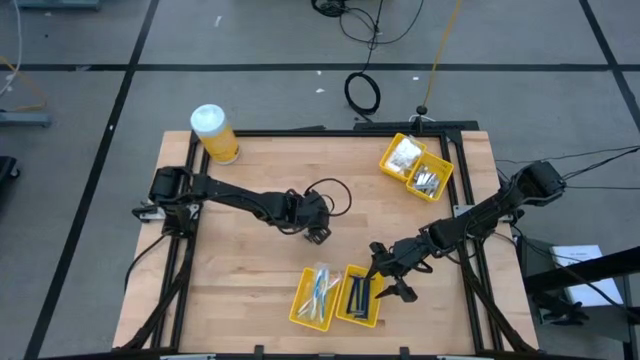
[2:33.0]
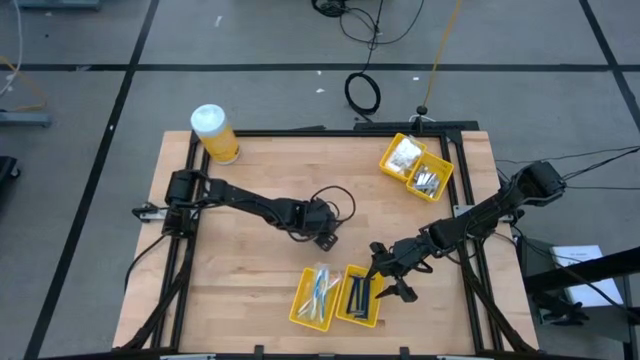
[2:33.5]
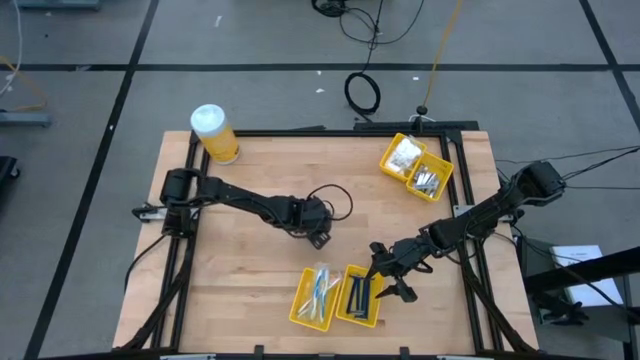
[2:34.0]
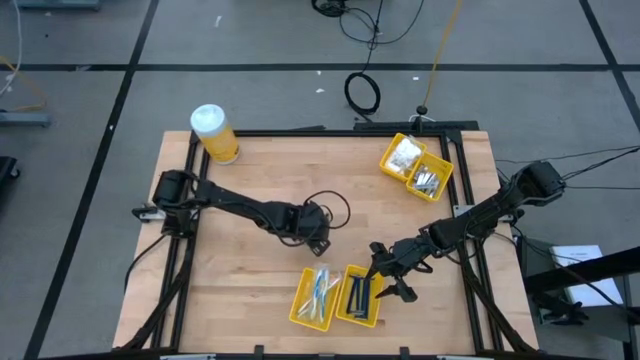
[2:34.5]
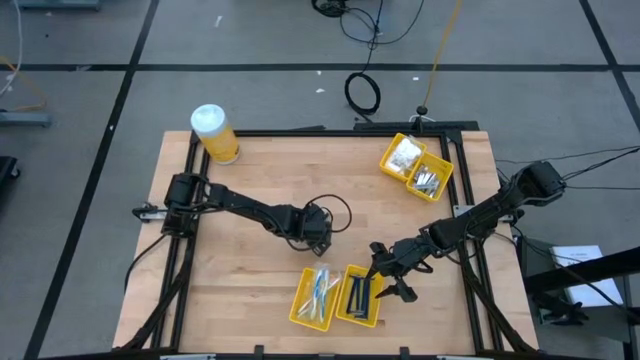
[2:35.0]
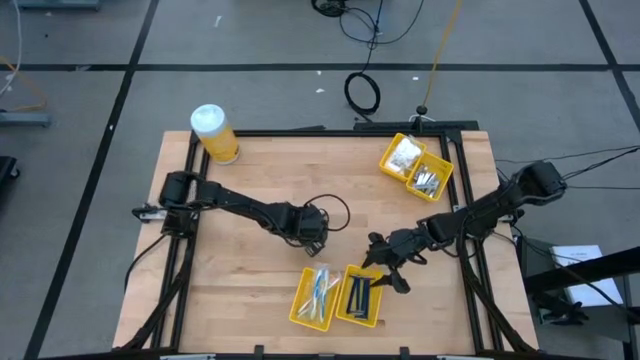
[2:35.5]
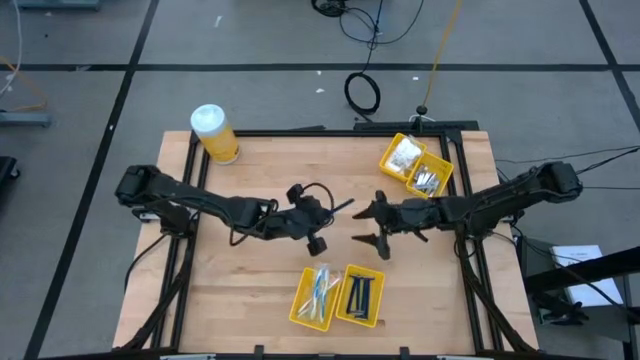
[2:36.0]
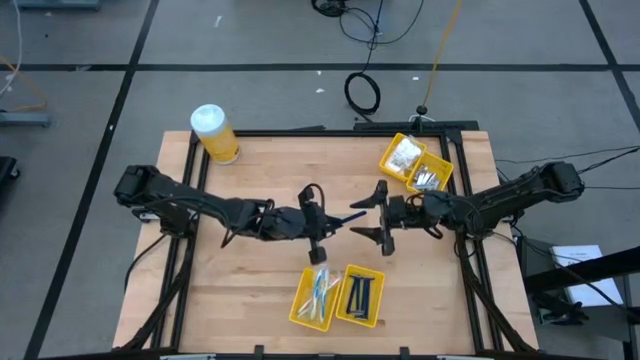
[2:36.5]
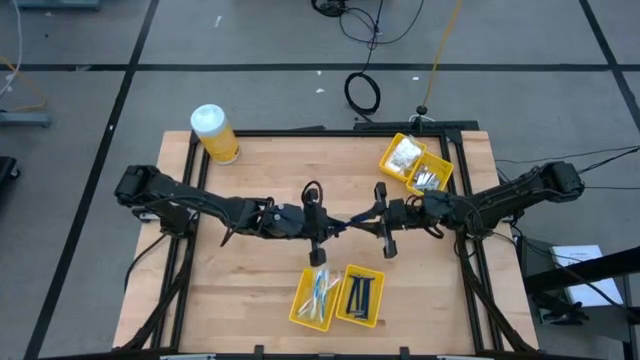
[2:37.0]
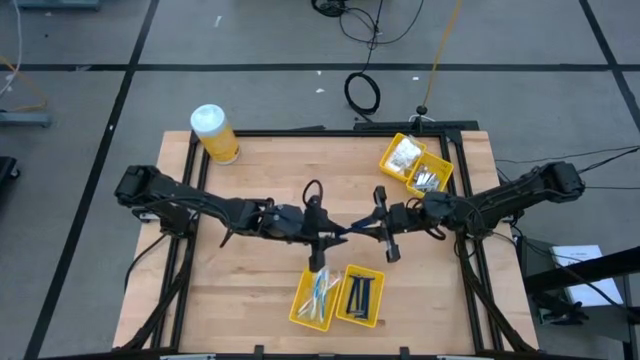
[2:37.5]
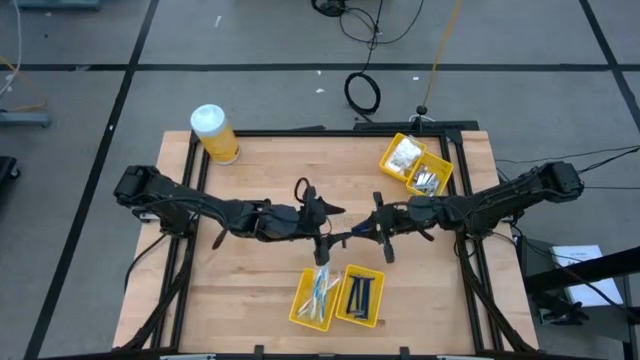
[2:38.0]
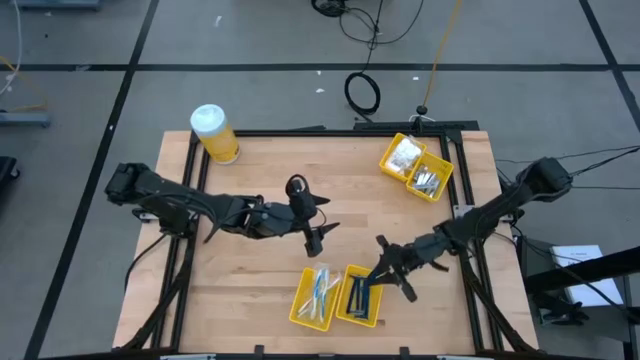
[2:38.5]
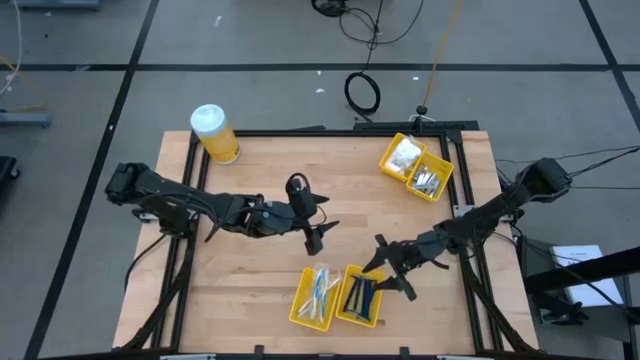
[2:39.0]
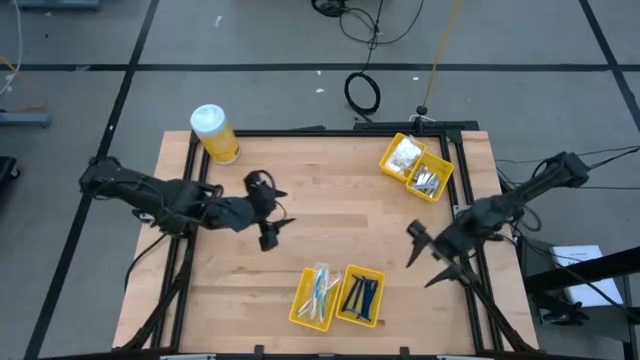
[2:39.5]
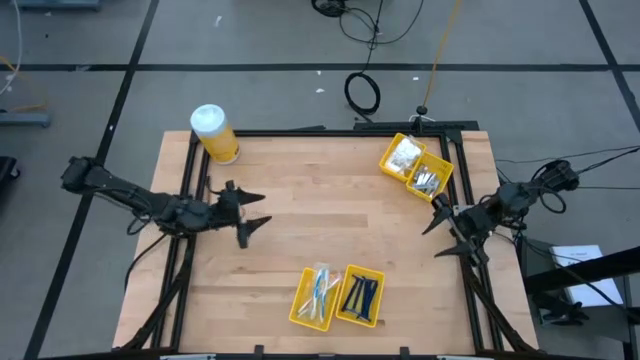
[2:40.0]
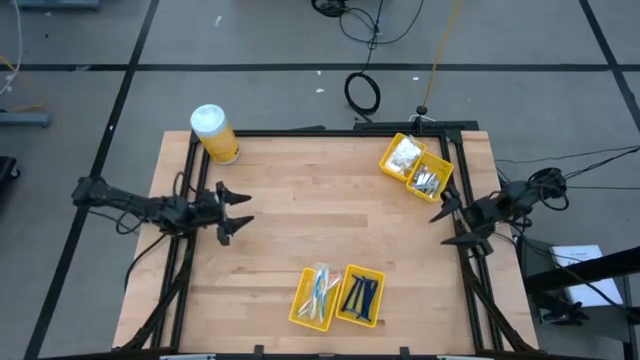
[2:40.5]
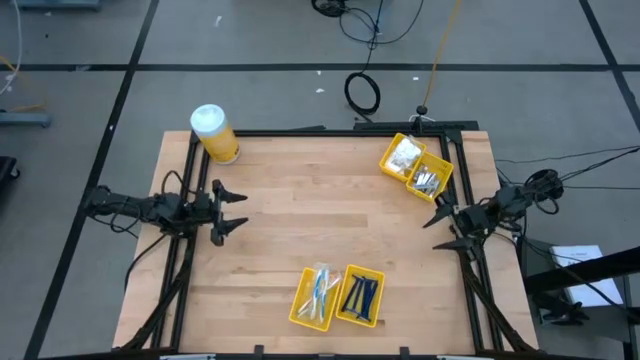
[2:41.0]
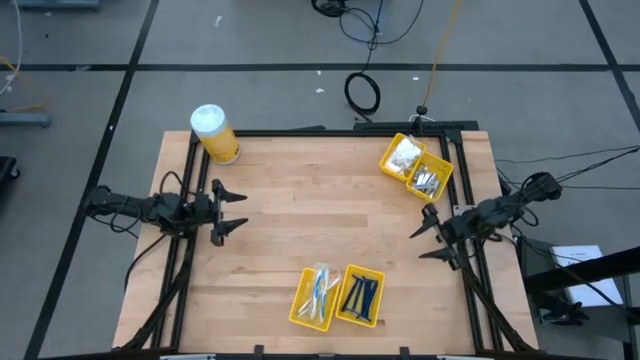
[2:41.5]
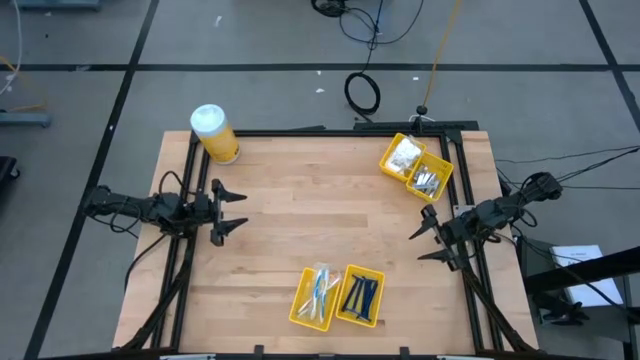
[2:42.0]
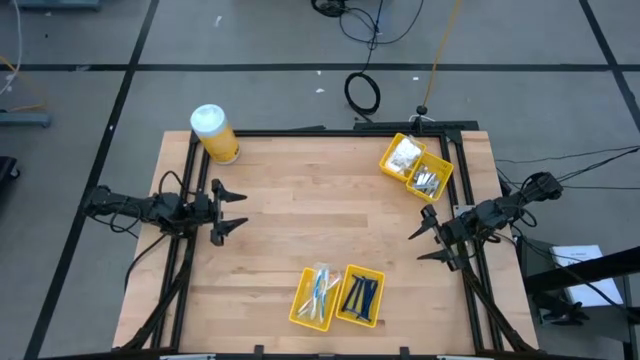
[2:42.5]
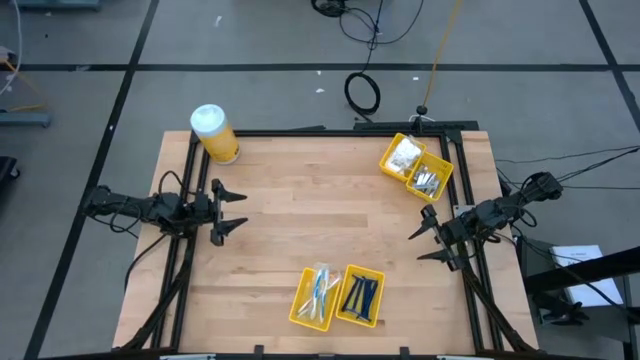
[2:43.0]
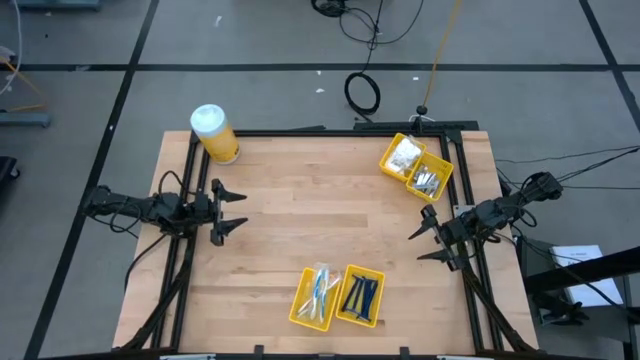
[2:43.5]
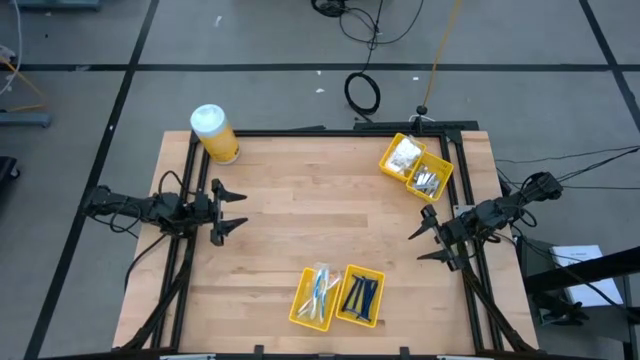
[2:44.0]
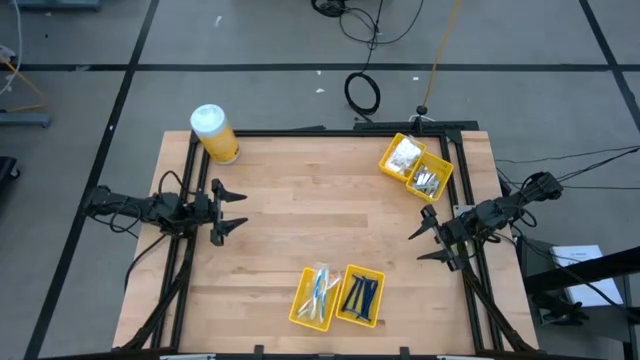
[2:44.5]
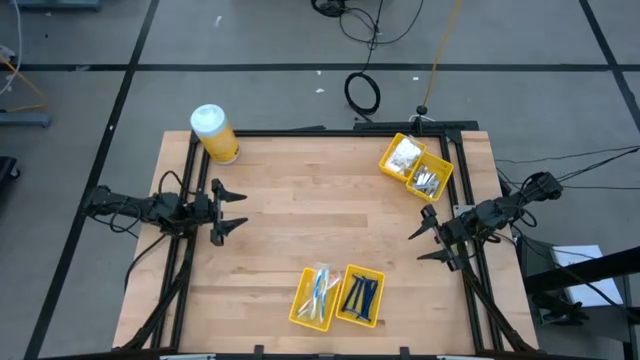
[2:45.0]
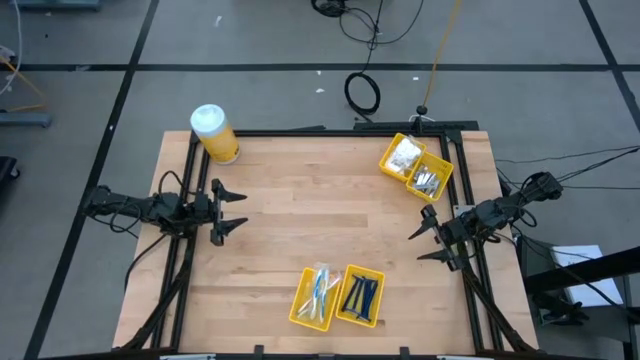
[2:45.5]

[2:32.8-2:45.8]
Task: Pick & Place Travel size toiletries
Put the blue rolled gauze into the bottom right yellow bin
